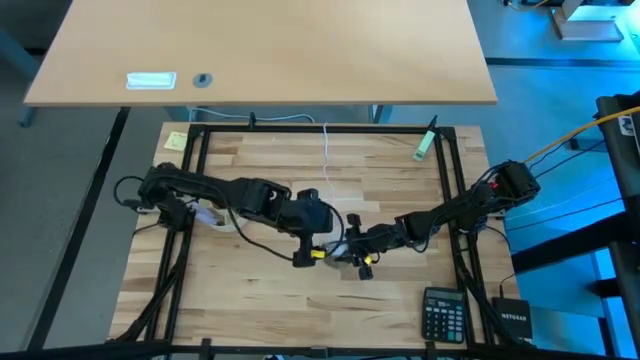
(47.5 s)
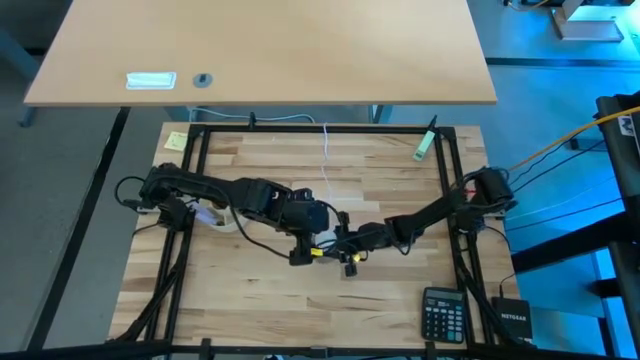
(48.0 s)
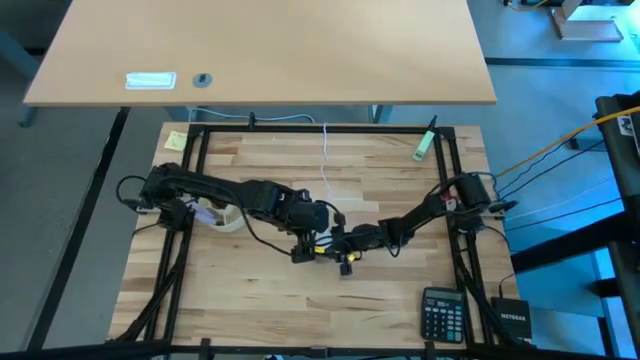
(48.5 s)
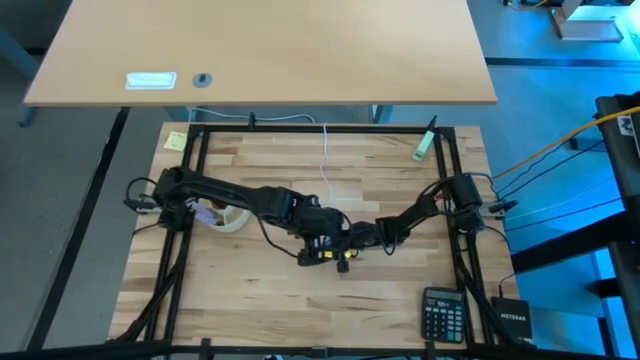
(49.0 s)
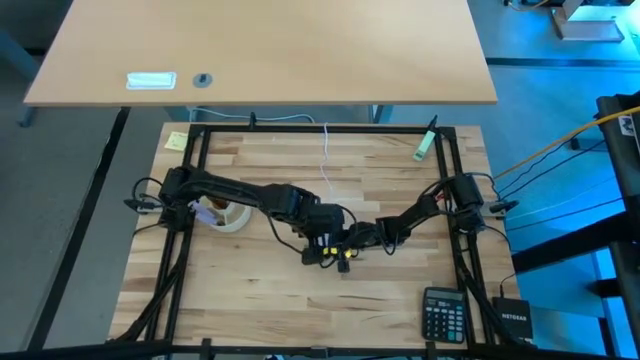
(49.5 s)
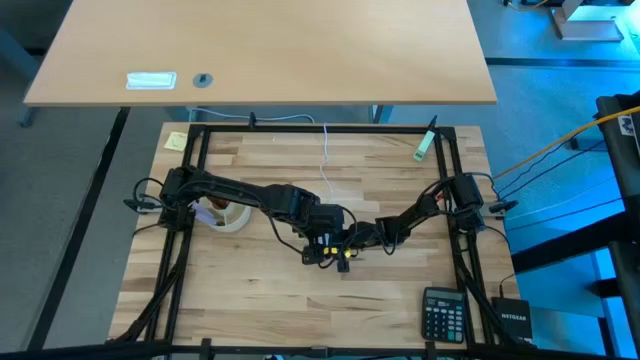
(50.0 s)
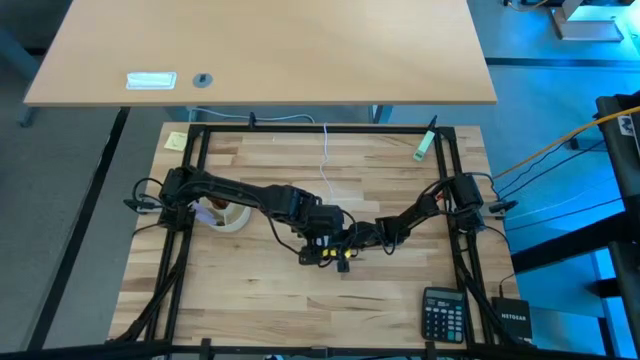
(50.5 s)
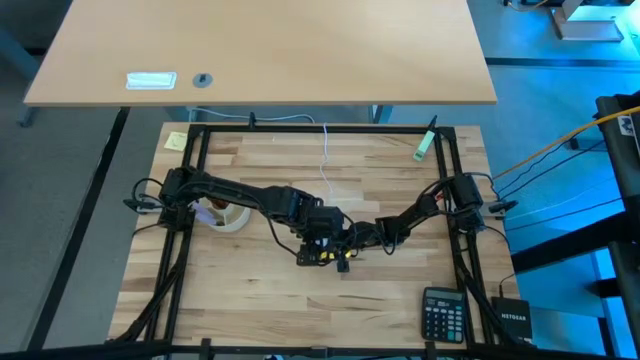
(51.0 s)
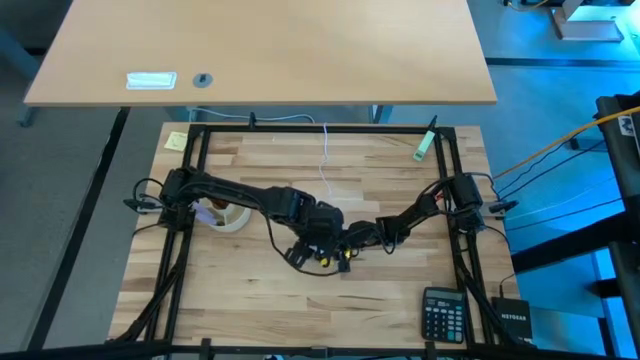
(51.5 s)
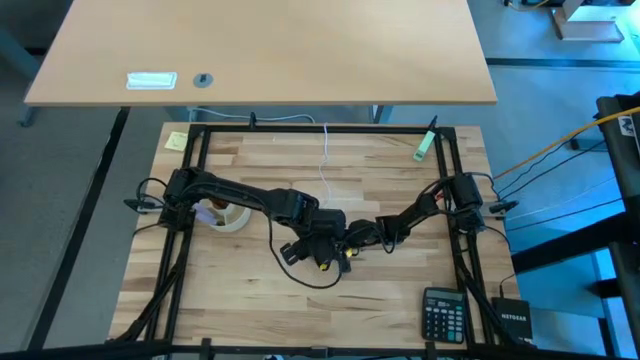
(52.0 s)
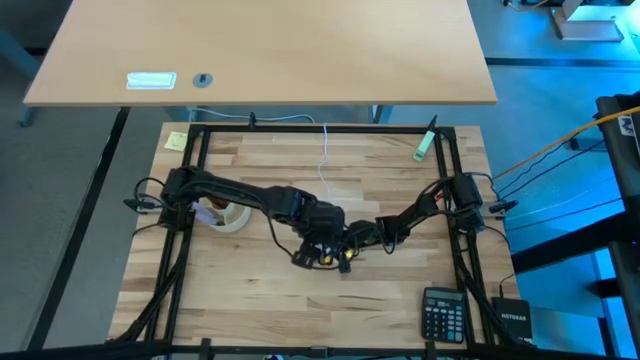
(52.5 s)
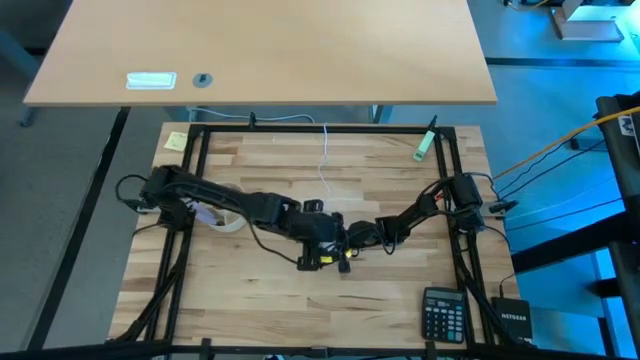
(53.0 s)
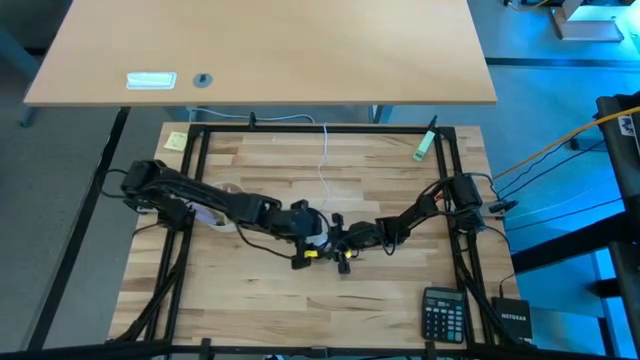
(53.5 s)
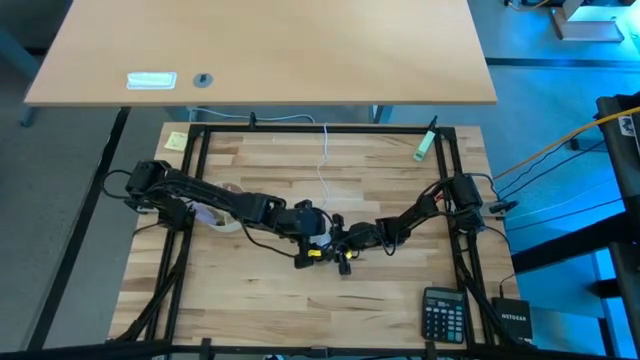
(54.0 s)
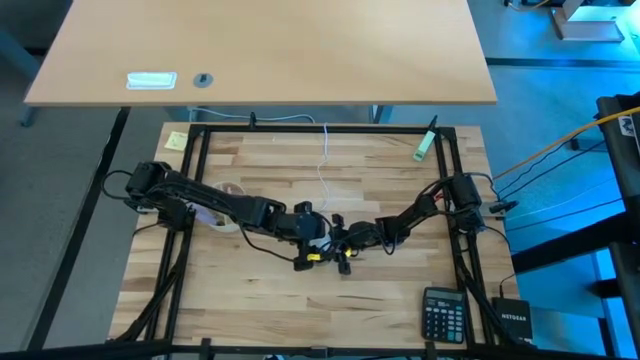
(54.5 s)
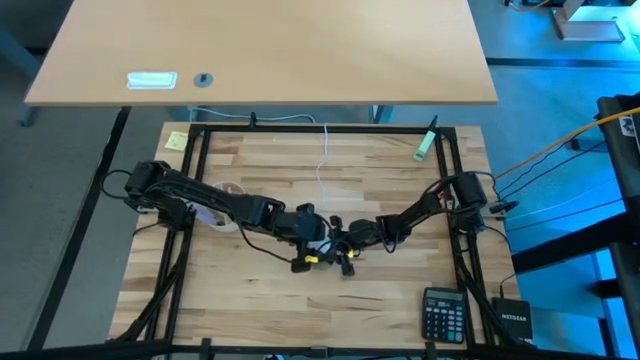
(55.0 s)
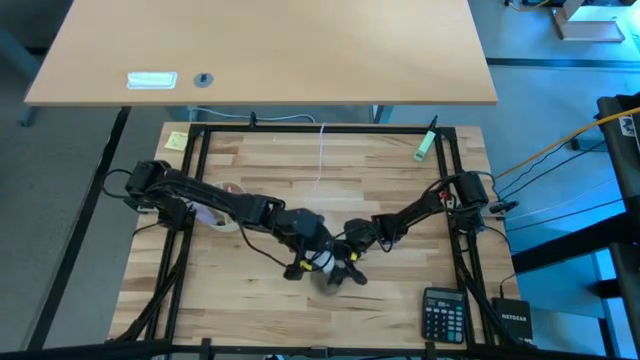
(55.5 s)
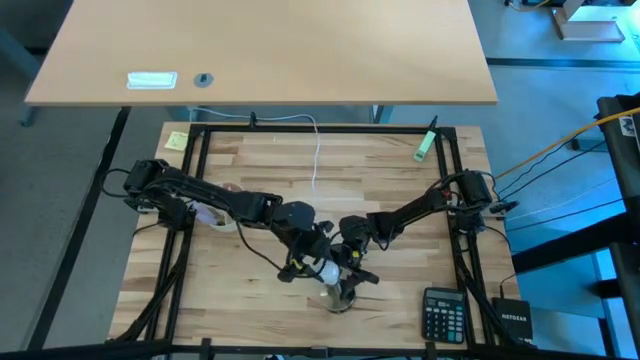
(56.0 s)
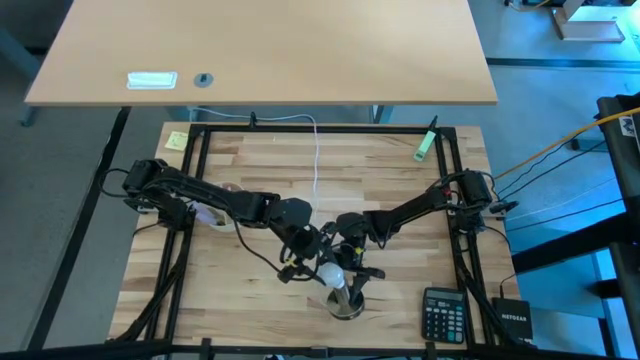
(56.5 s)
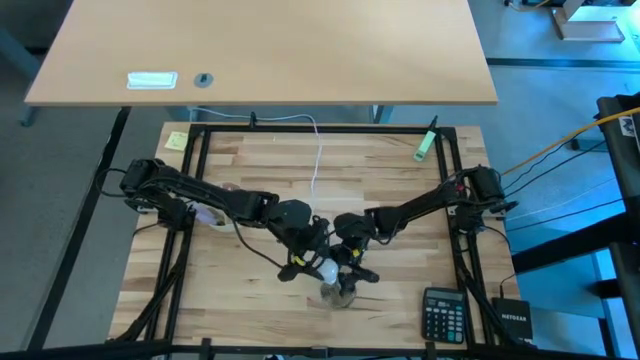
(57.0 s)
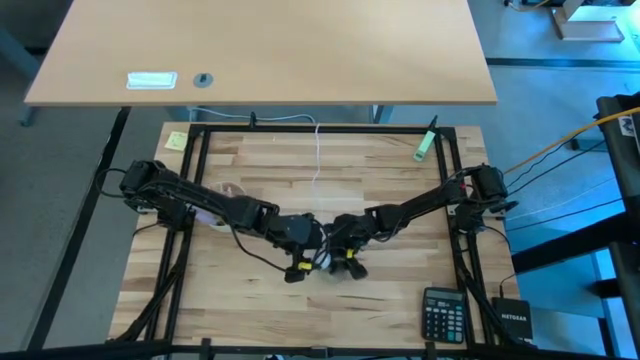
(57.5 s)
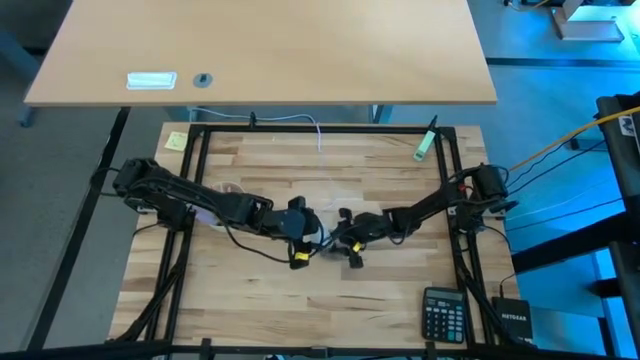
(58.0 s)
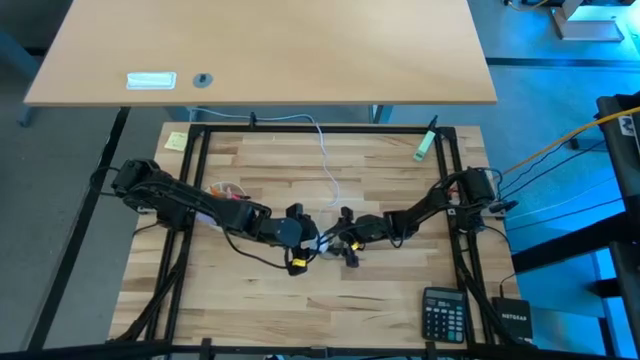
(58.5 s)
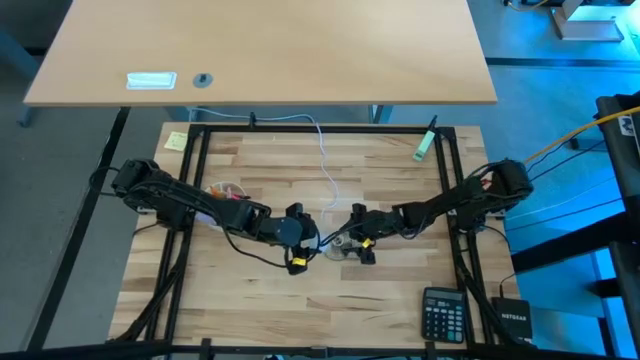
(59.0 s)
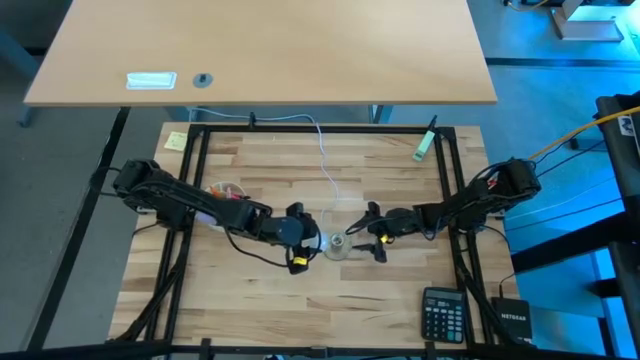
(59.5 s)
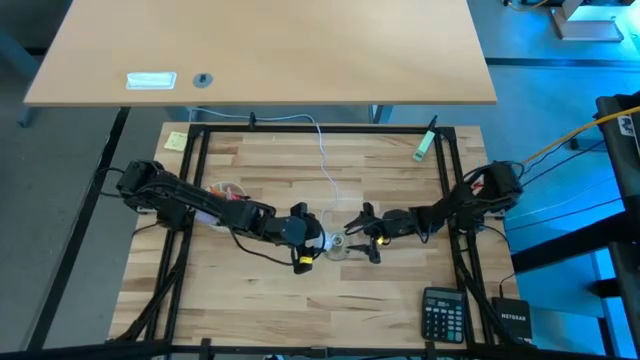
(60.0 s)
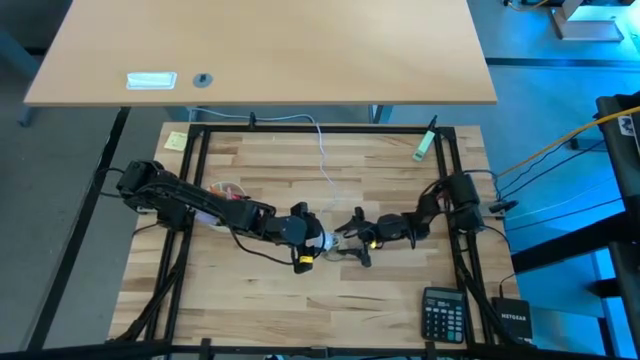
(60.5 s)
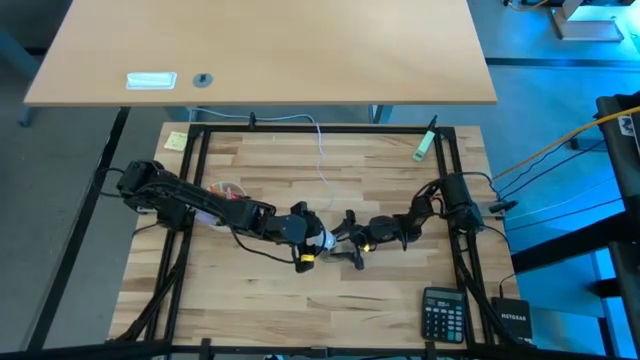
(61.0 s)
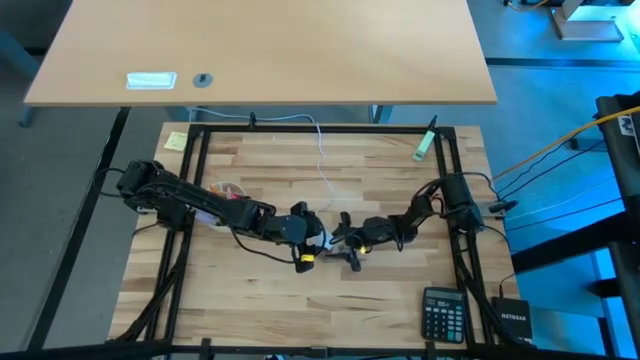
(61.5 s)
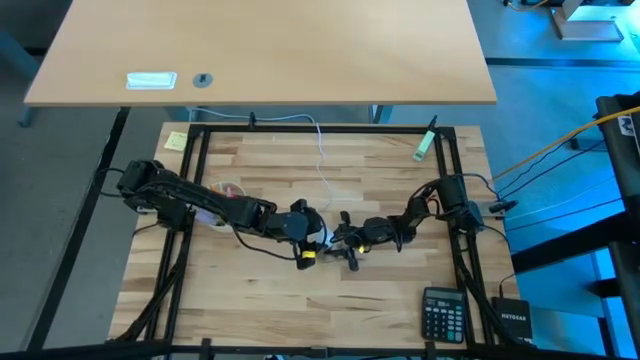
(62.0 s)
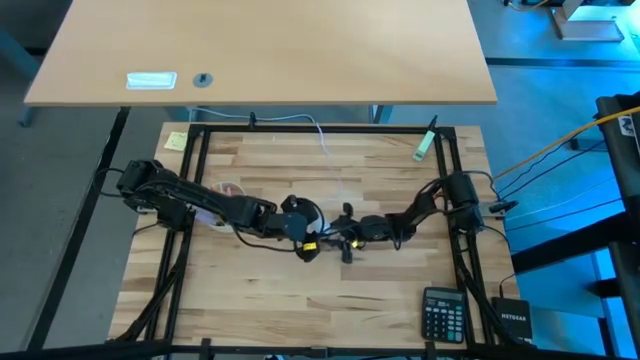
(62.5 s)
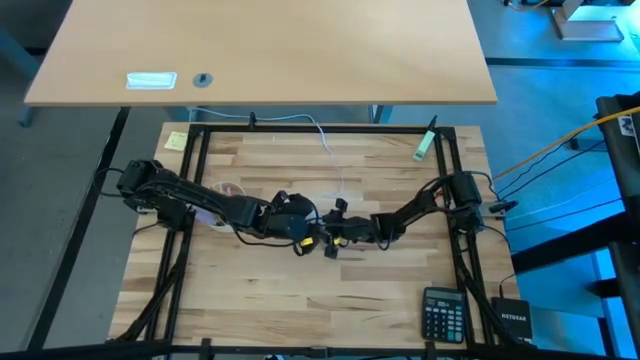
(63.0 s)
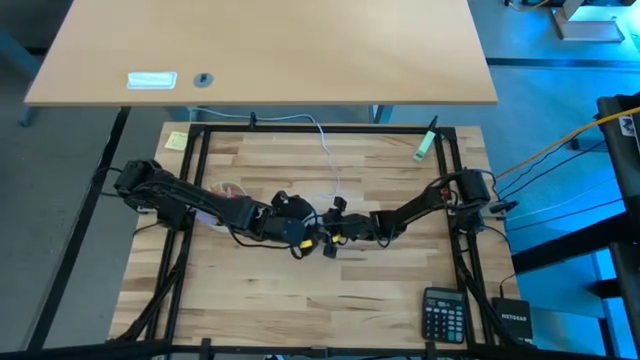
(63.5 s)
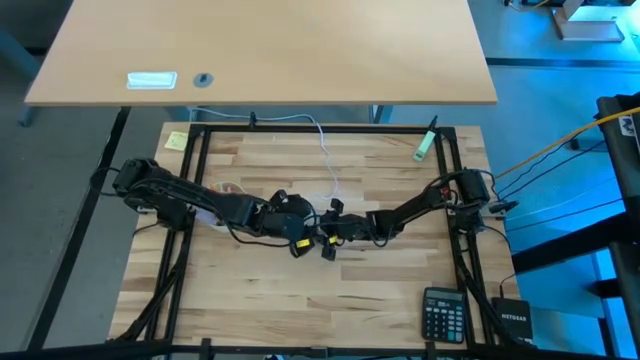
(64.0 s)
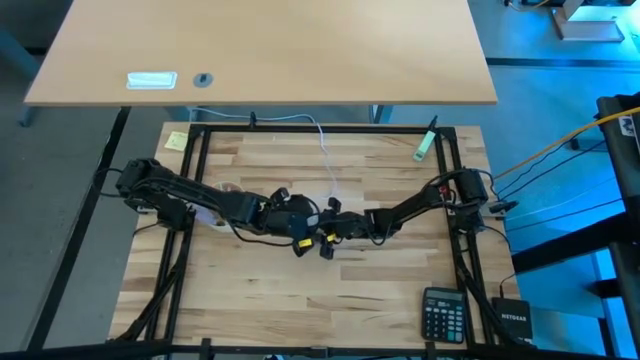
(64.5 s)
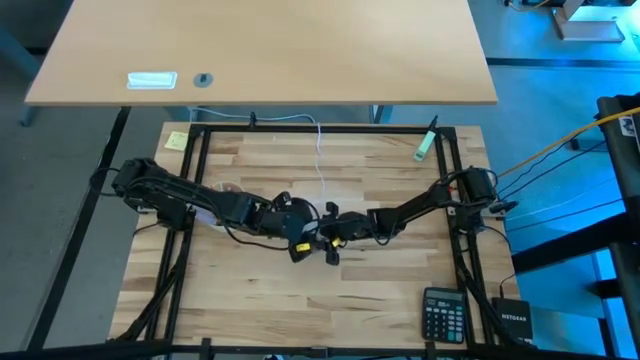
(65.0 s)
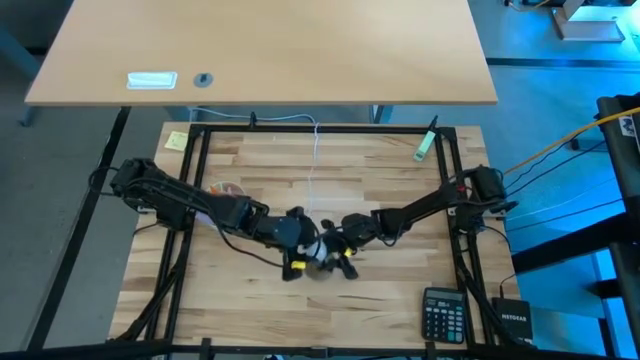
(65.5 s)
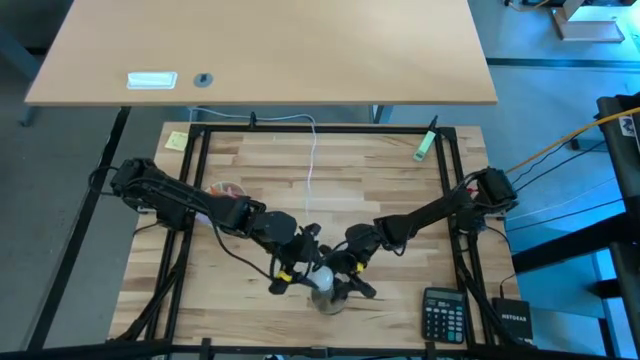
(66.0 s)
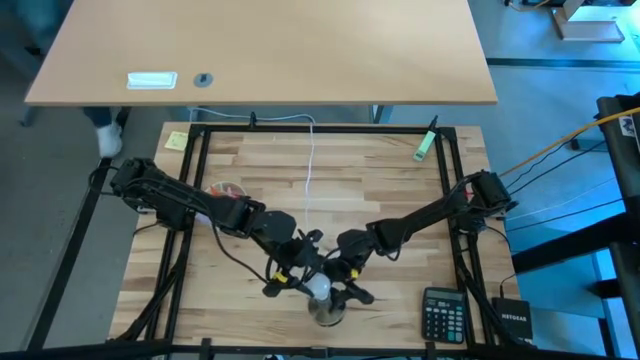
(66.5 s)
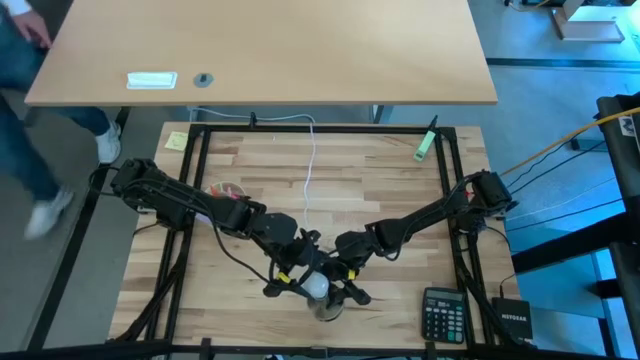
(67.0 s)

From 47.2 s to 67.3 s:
Task: Screw lightbulb
Insert the lightbulb into the lamp
